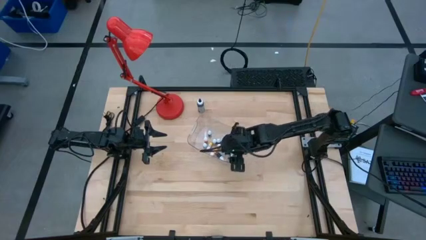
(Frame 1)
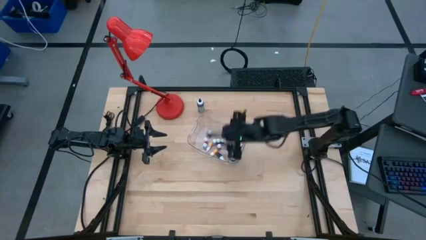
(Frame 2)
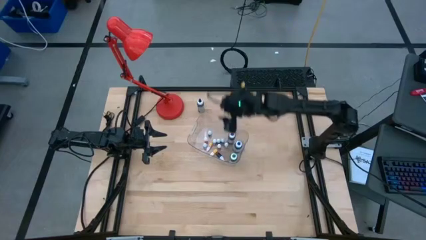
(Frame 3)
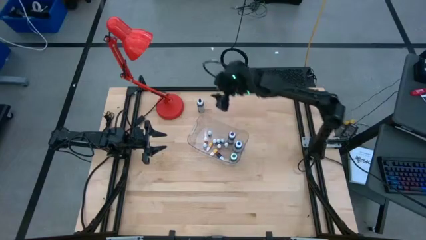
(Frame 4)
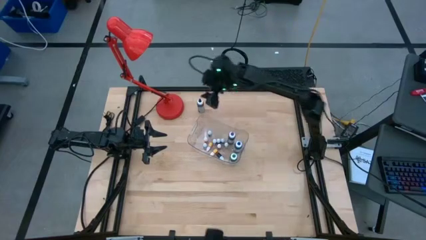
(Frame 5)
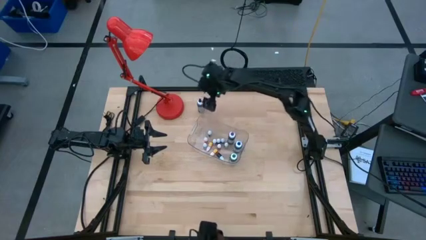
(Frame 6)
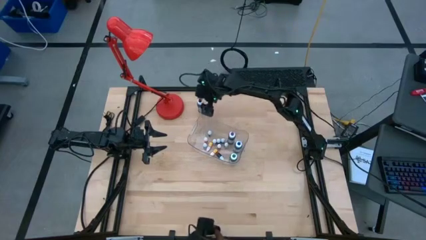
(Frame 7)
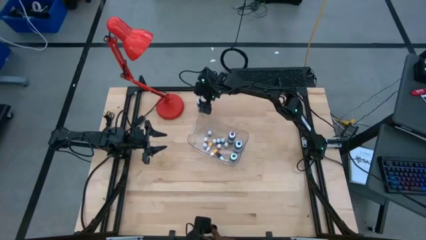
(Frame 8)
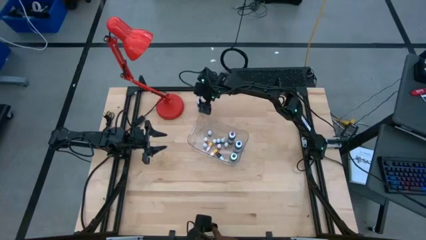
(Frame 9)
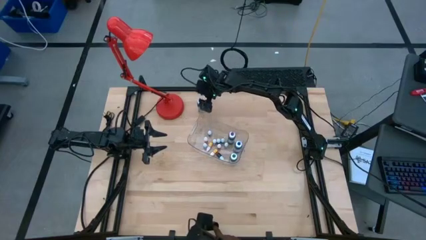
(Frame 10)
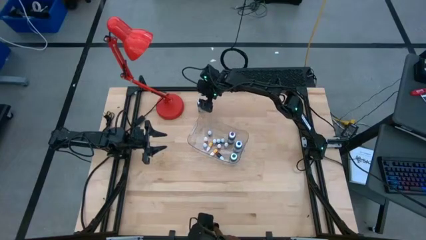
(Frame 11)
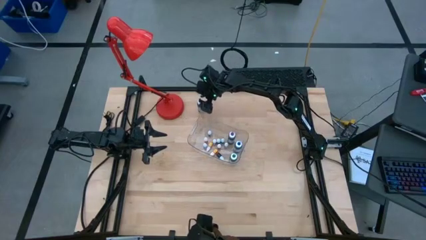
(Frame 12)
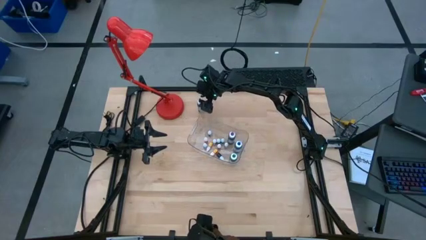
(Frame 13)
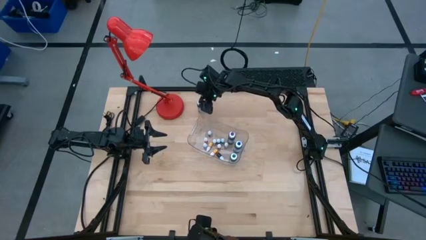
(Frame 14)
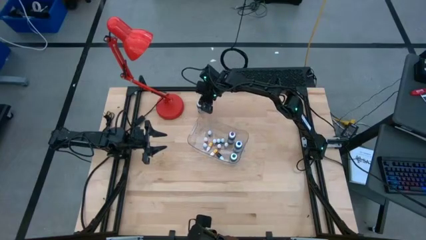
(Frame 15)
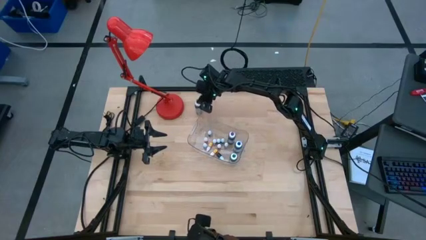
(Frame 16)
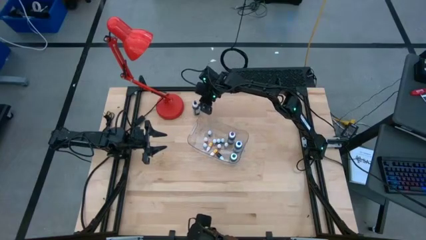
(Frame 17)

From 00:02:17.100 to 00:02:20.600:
Task: Pick & Place food coloring
Put the big black food coloring bottle in the transparent bin

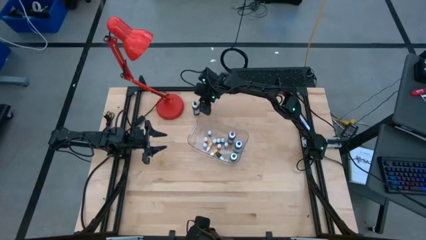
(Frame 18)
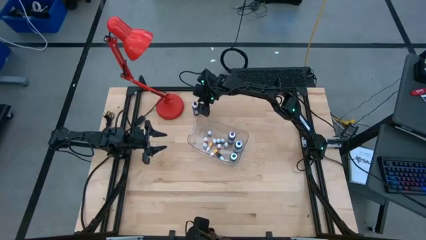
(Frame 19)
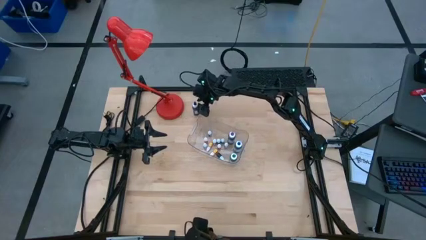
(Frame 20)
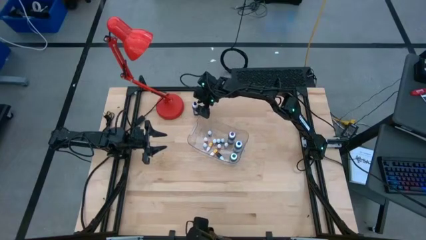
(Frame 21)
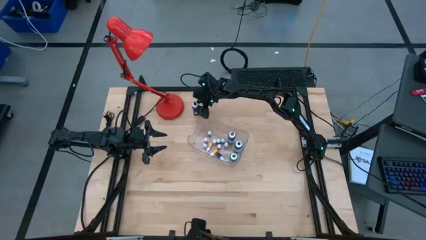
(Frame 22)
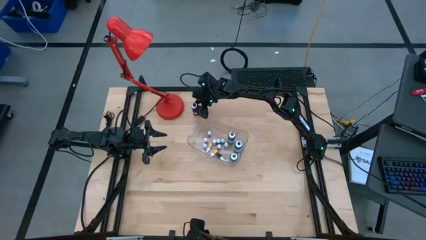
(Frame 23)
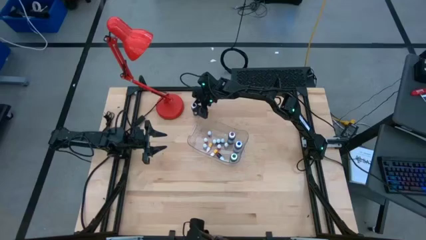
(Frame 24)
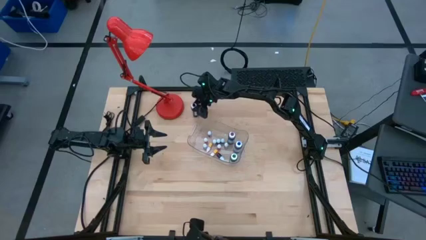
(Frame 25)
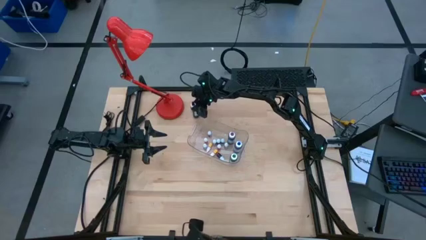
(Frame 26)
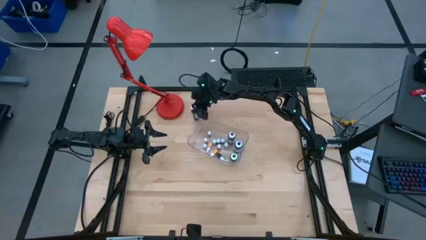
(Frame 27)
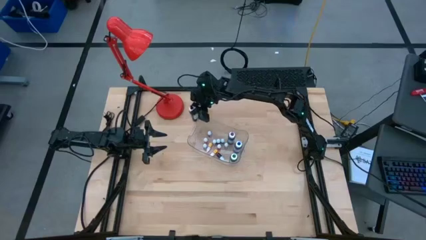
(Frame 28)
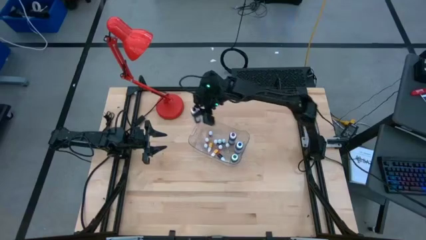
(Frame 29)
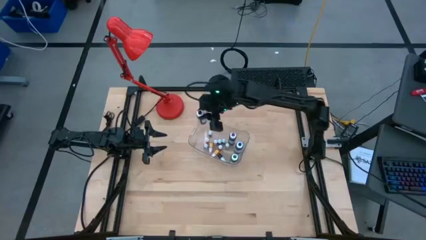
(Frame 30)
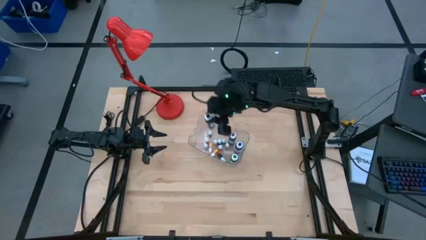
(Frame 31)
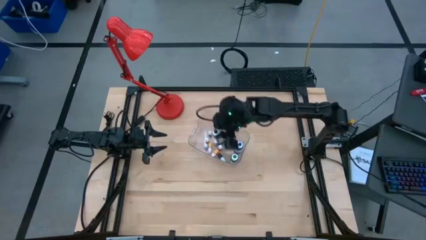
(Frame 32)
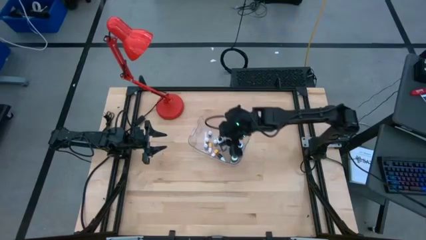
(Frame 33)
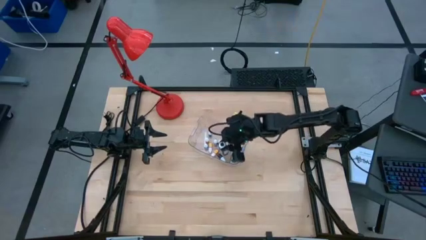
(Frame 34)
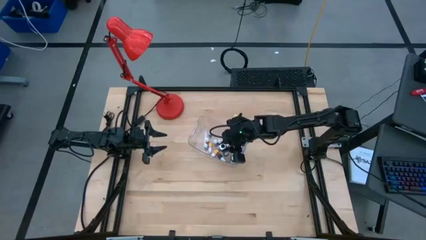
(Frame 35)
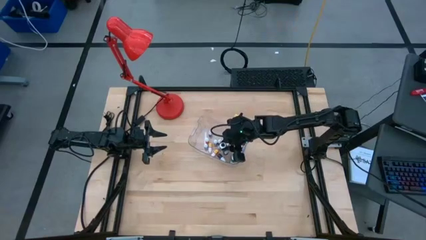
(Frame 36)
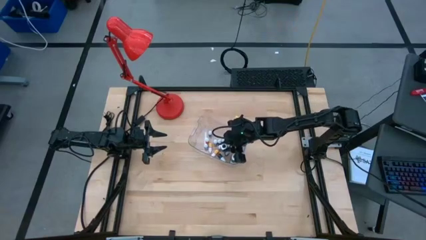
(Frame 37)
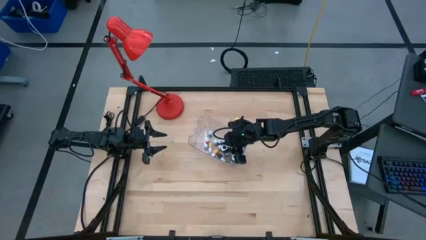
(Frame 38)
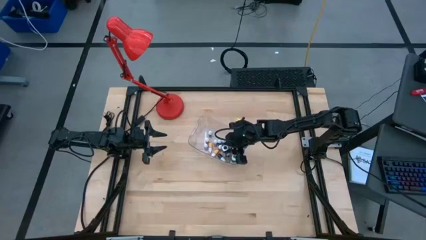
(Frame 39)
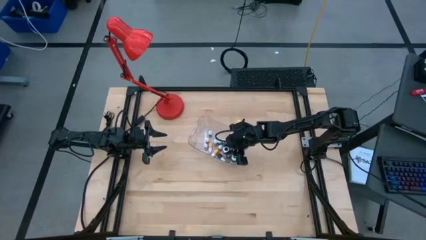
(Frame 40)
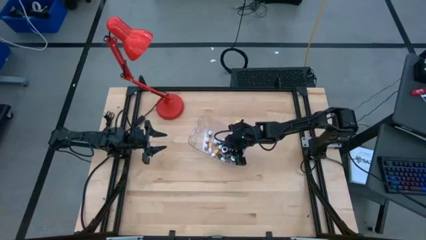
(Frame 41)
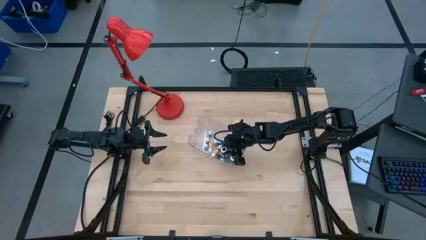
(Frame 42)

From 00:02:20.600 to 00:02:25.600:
Put the big black food coloring bottle in the transparent bin

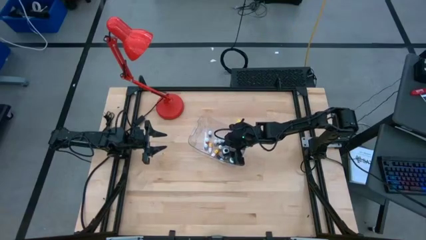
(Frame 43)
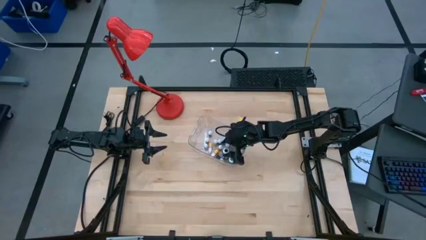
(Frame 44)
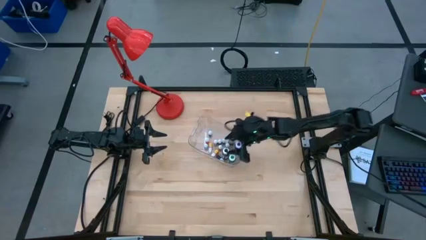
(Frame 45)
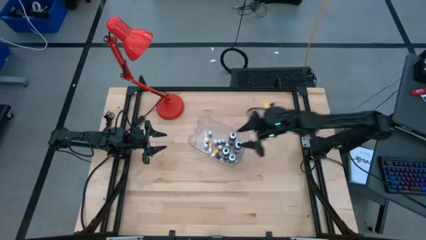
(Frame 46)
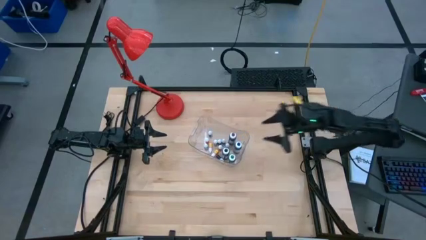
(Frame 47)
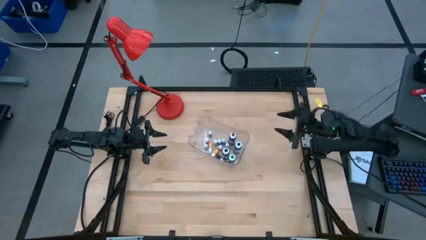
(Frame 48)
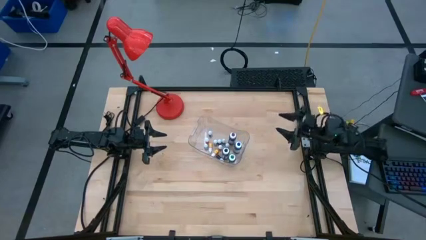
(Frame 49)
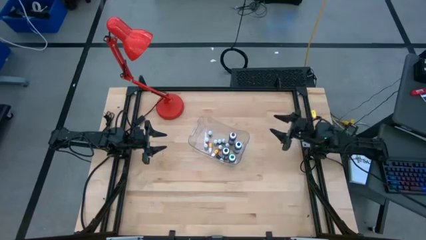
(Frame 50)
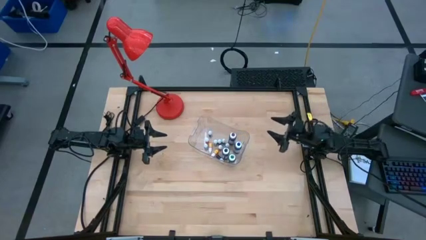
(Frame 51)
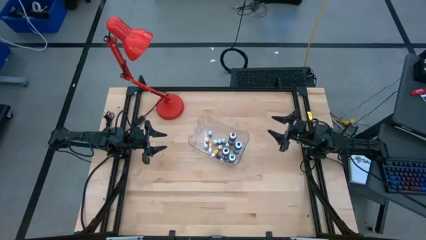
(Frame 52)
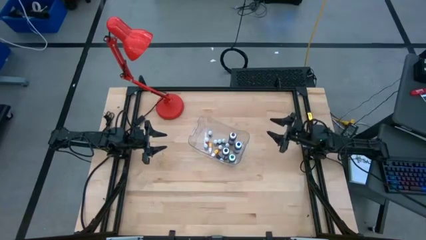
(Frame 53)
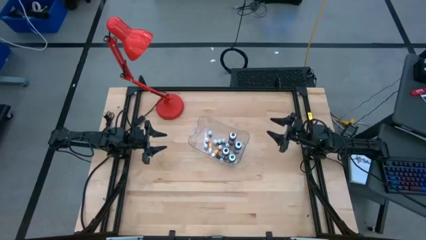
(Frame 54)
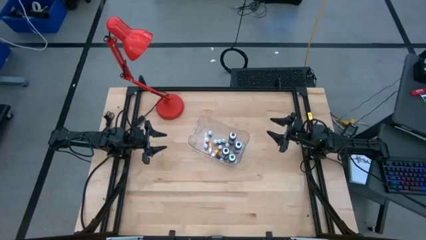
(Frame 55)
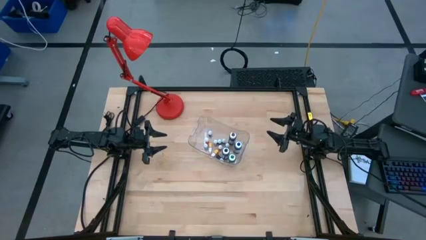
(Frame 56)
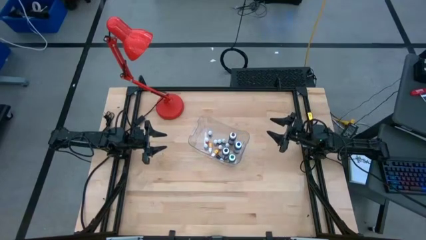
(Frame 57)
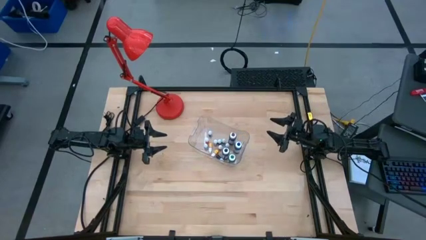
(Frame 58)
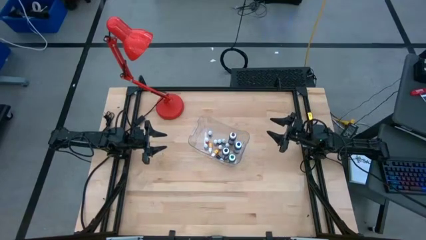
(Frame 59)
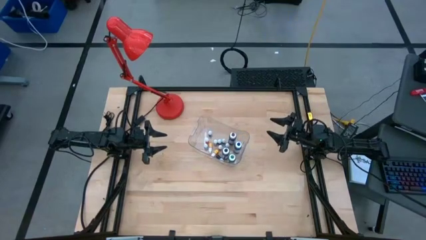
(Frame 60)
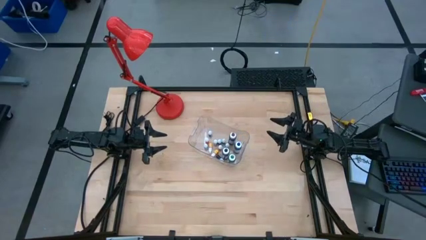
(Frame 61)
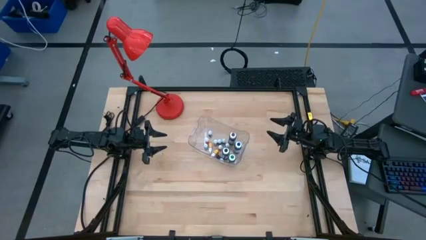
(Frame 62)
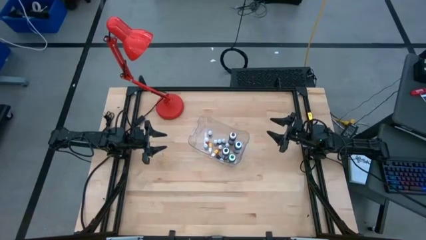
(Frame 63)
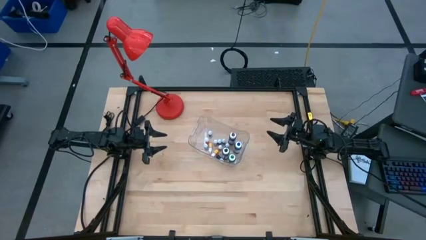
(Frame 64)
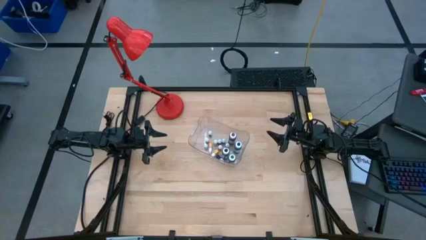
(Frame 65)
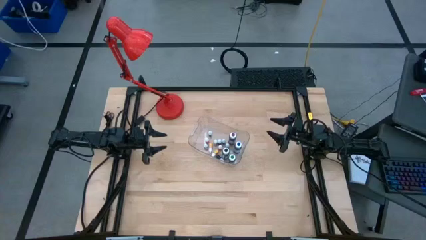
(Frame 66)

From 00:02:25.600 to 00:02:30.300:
Return to Home Position

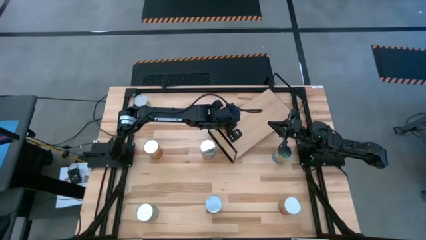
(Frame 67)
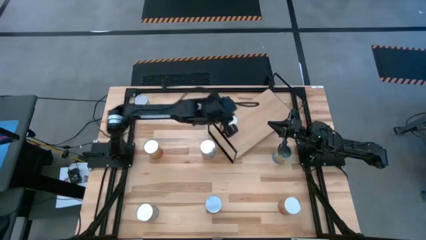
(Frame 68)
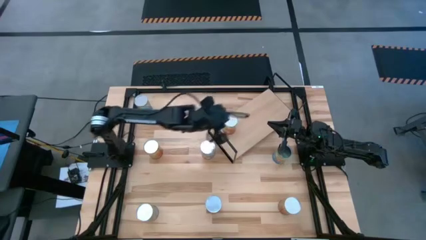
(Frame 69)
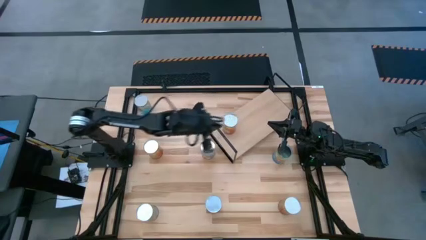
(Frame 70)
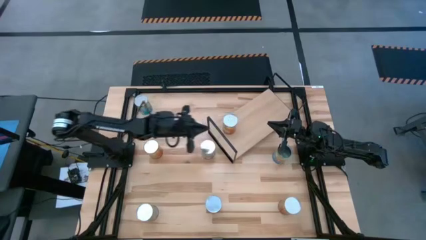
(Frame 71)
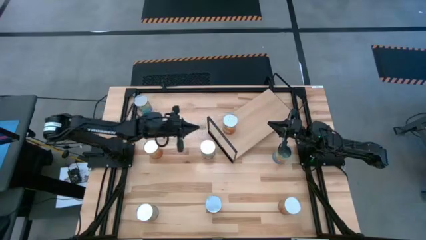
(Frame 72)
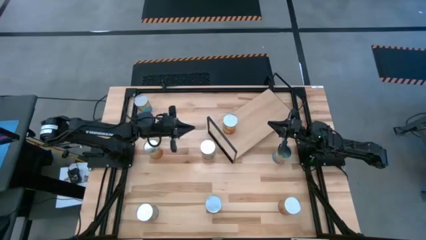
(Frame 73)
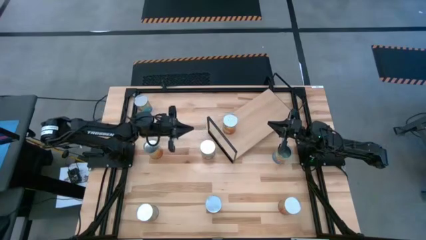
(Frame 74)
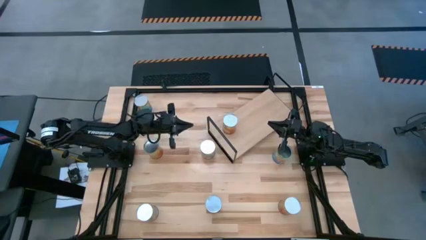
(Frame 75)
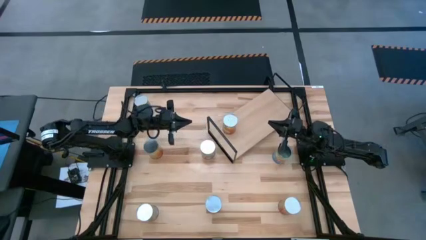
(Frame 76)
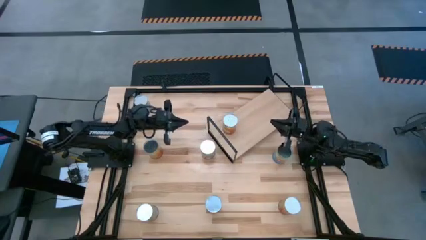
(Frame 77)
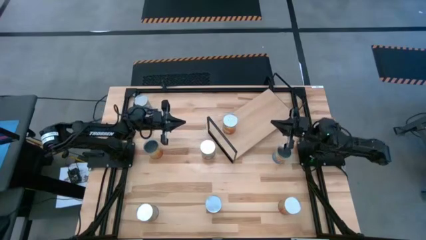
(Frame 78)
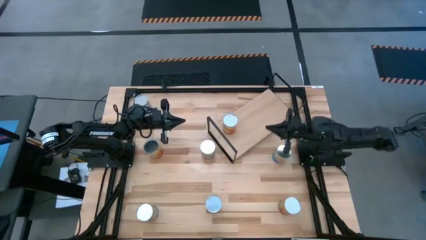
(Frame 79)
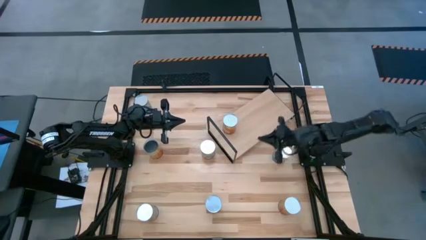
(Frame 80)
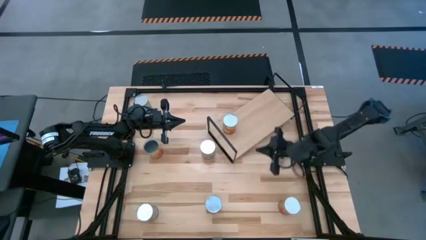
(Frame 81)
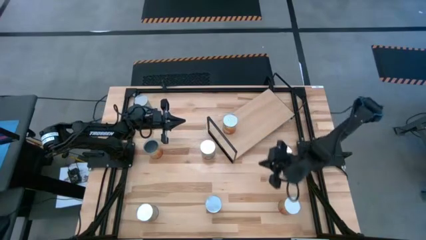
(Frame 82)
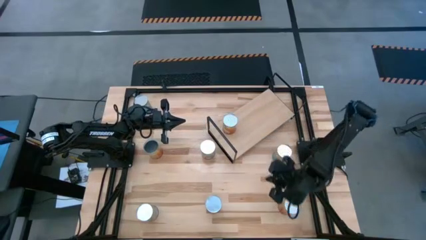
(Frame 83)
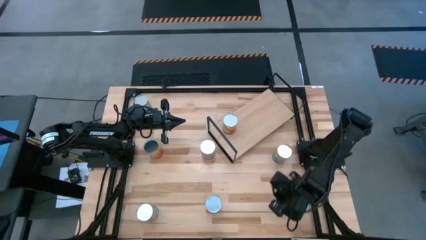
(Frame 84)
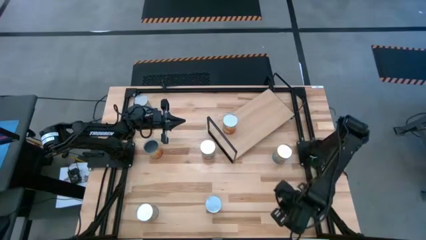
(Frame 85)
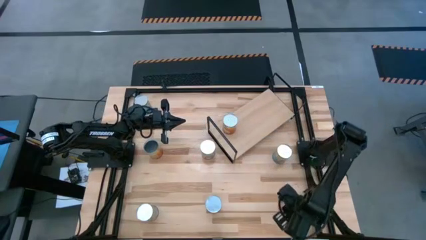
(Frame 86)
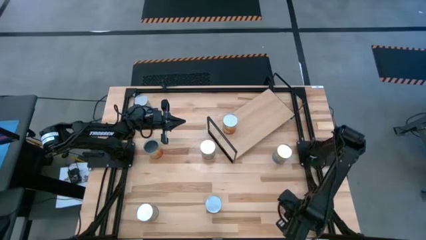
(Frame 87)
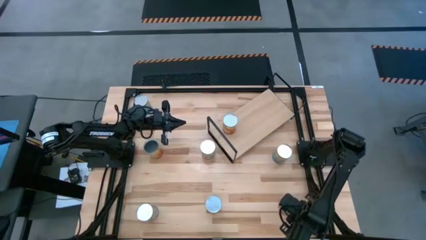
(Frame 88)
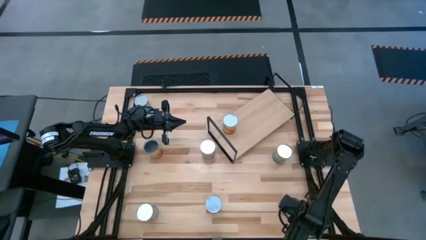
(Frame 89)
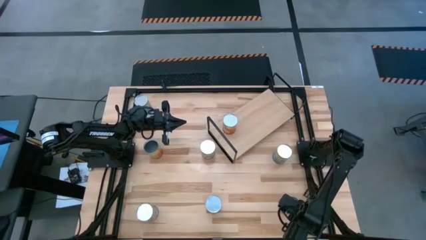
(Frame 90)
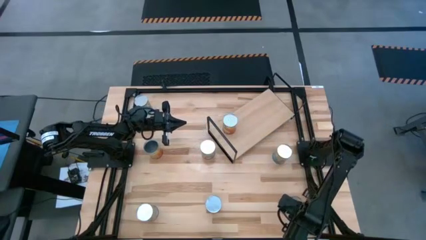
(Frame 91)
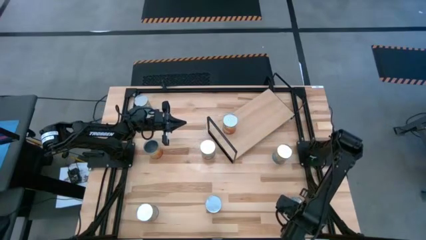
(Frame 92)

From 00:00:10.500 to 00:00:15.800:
Task: Pick and place cans onto a shelf
Put the bottom canned green beans on the shelf
